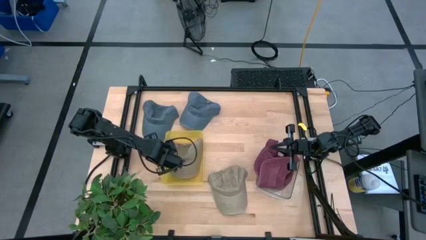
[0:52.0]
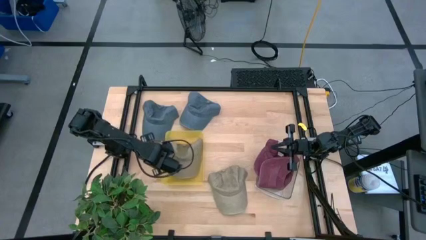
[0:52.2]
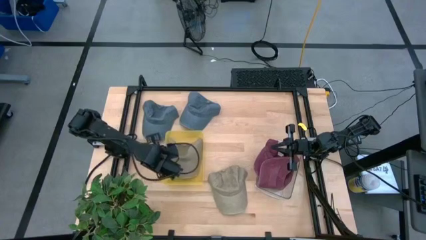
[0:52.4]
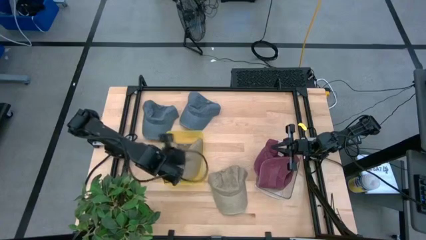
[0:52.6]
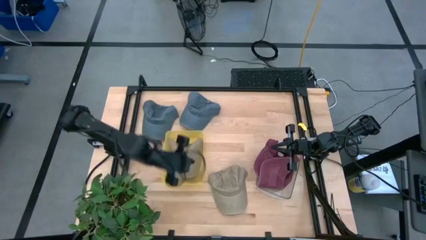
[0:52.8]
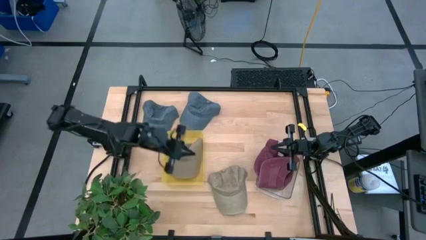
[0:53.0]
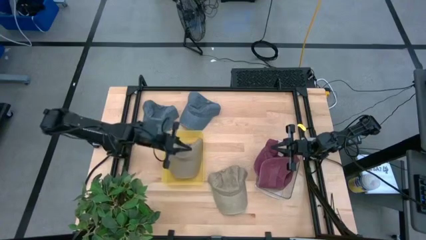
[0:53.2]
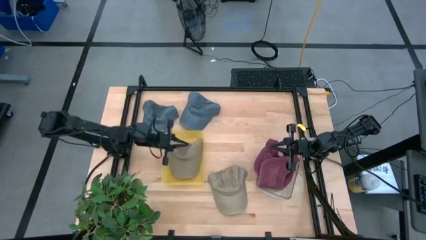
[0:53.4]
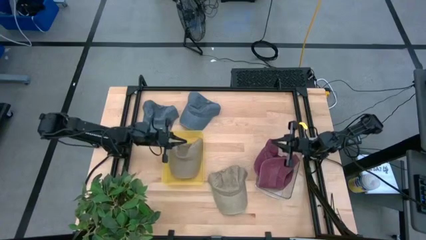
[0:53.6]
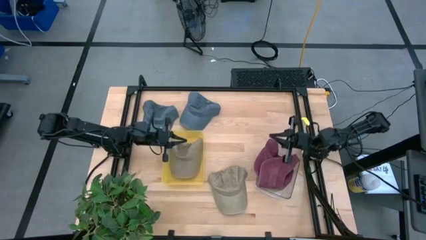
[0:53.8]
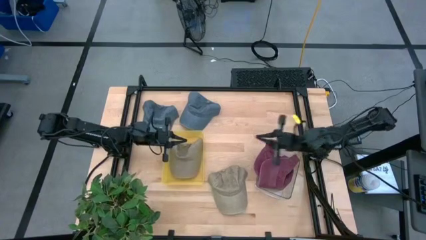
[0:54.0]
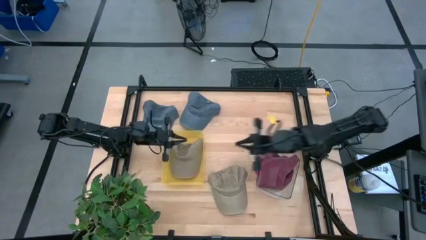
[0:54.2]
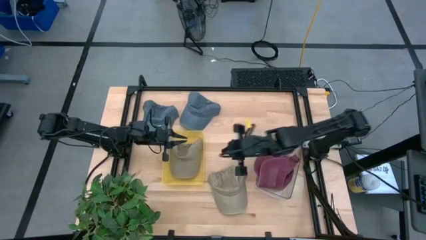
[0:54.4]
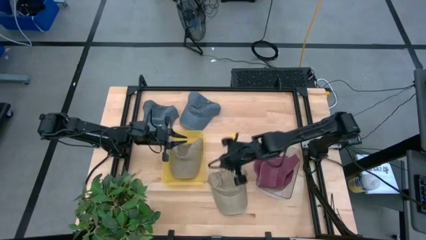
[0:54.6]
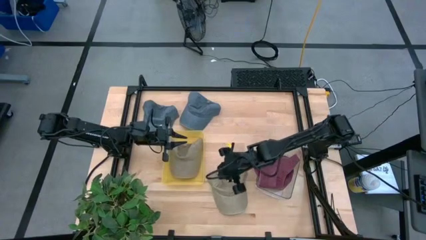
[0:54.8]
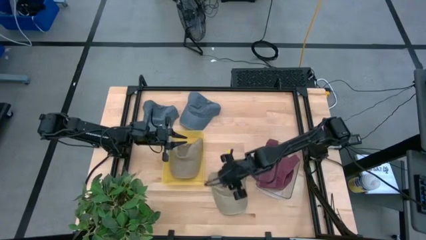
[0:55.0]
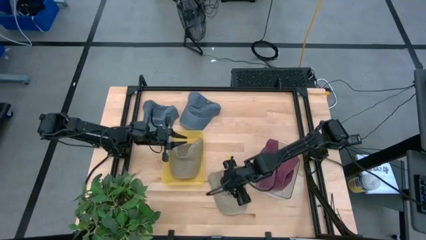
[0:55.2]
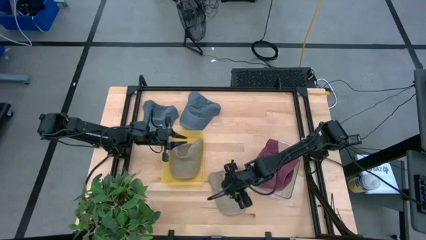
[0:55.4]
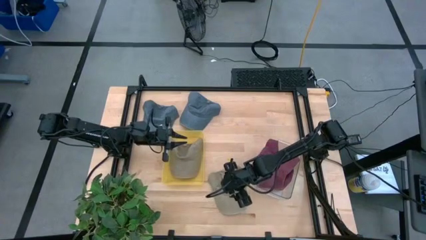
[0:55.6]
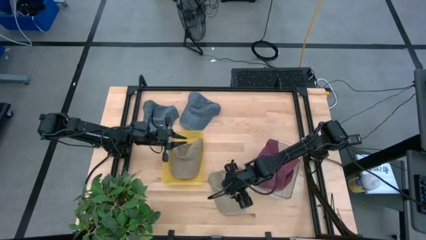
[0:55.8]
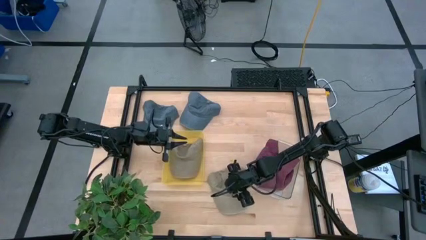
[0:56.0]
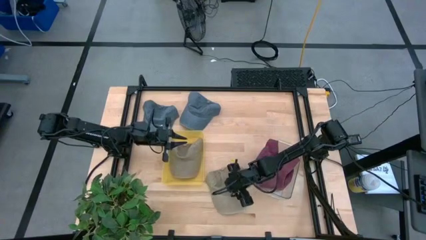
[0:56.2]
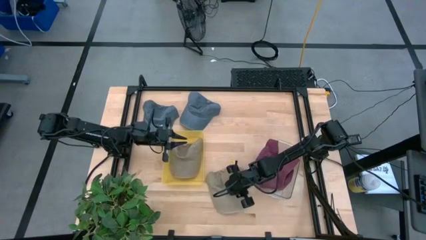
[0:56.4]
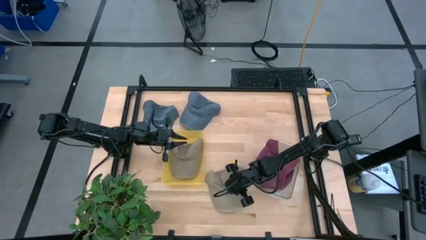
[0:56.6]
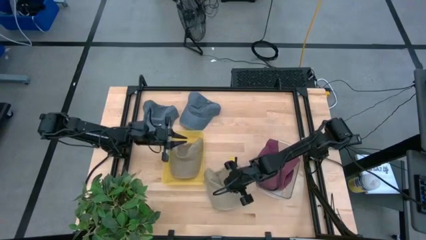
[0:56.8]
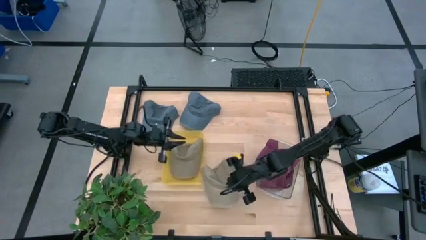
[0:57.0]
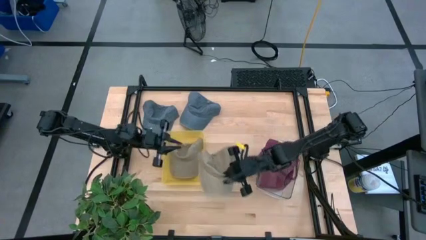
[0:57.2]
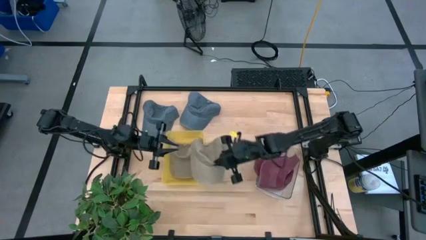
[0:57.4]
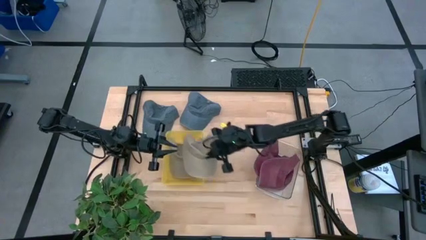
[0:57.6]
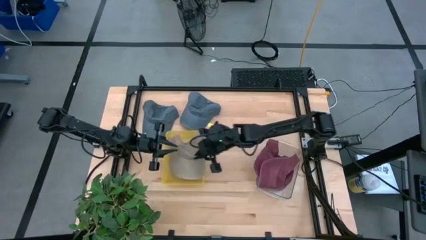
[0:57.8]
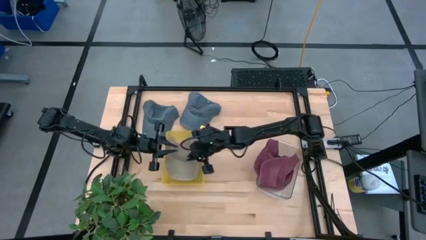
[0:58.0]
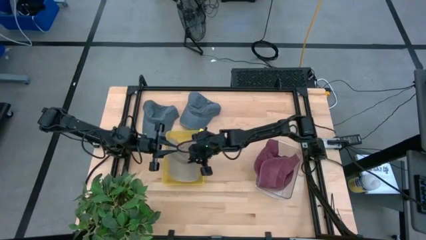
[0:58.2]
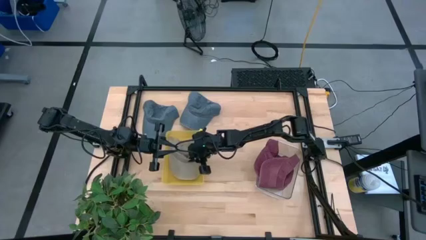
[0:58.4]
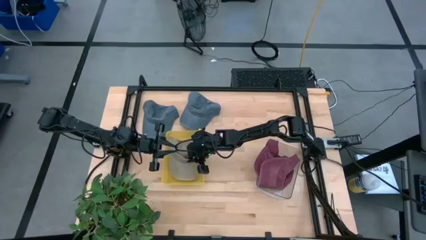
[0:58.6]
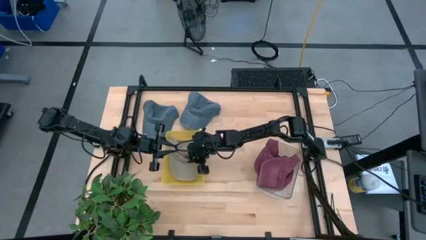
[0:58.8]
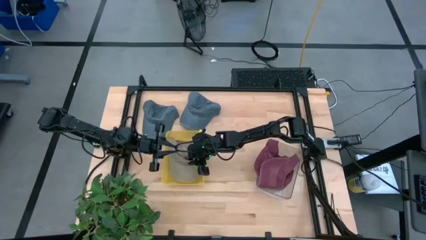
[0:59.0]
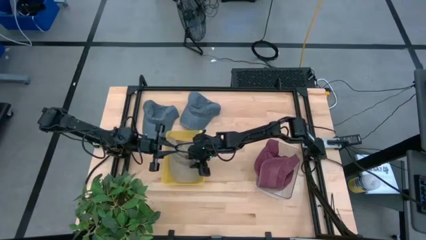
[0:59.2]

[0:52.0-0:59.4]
Task: Pick & Place hat
Put the brown cap into the yellow bin

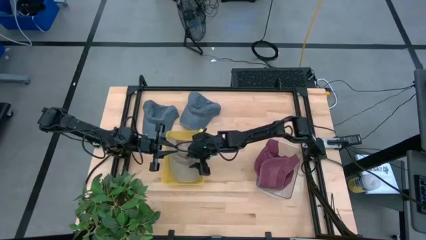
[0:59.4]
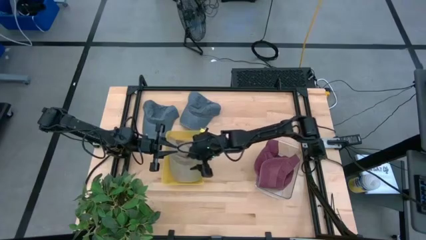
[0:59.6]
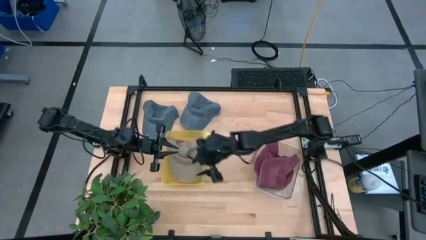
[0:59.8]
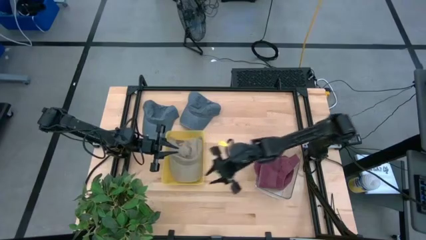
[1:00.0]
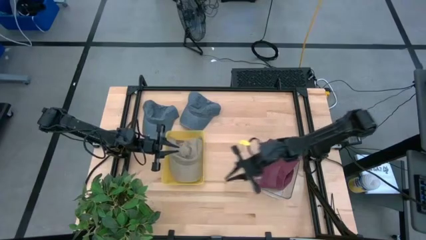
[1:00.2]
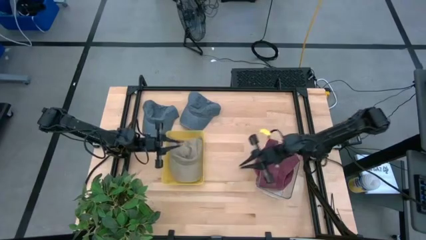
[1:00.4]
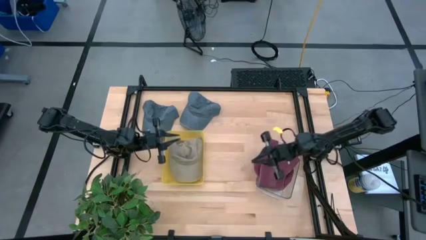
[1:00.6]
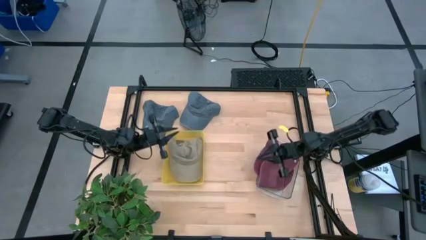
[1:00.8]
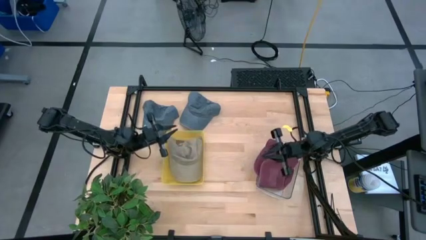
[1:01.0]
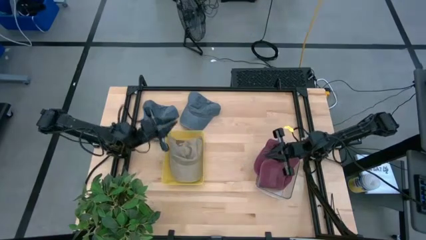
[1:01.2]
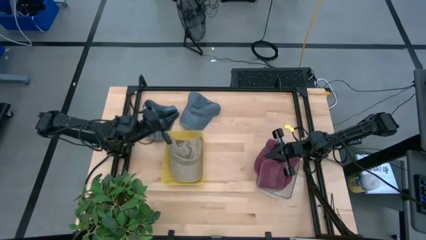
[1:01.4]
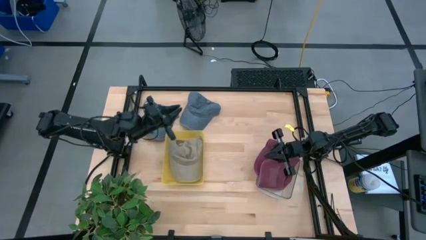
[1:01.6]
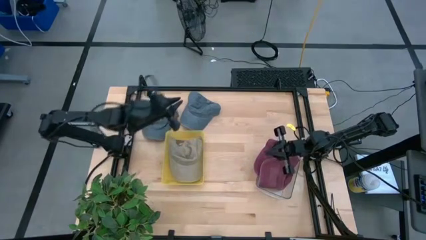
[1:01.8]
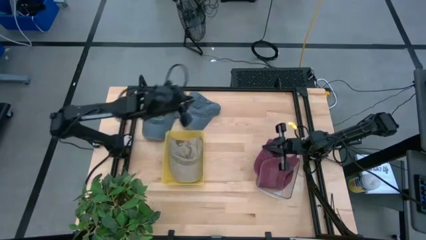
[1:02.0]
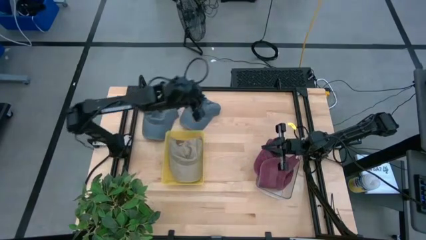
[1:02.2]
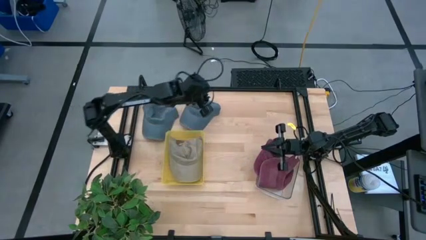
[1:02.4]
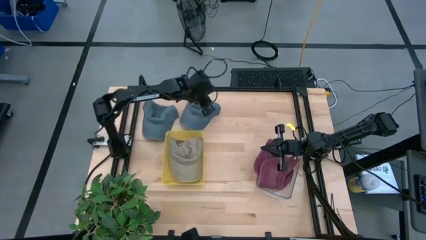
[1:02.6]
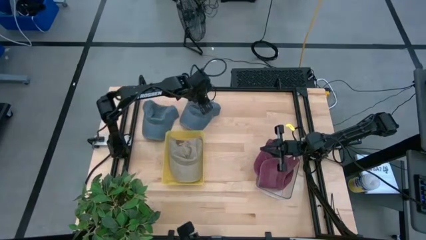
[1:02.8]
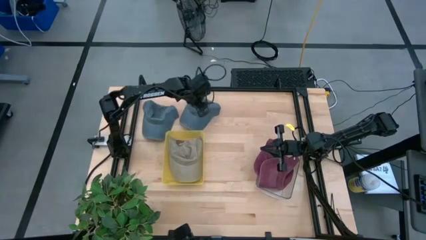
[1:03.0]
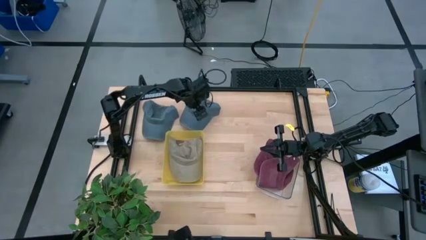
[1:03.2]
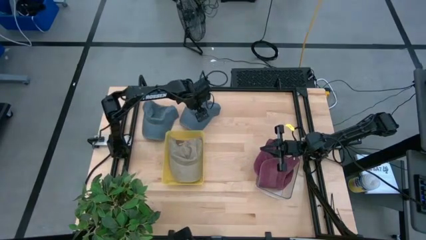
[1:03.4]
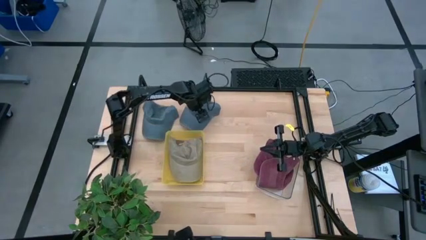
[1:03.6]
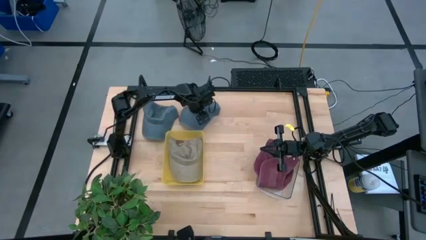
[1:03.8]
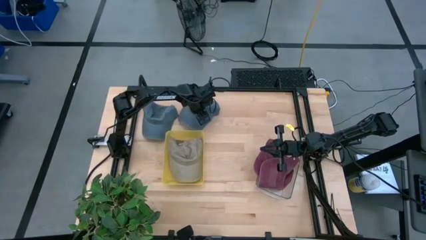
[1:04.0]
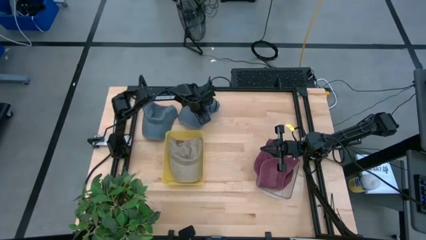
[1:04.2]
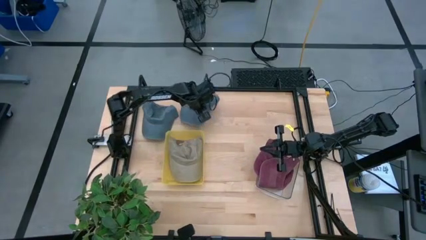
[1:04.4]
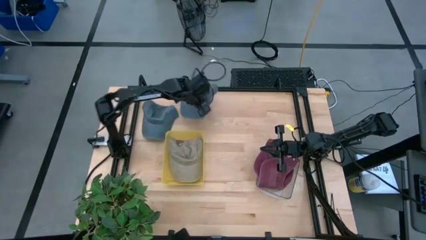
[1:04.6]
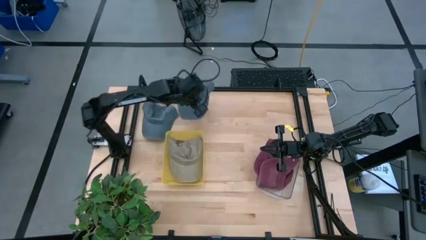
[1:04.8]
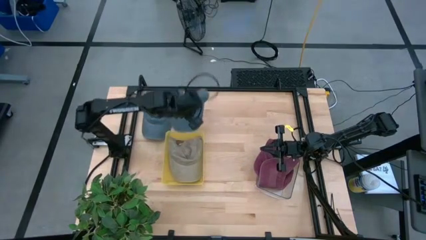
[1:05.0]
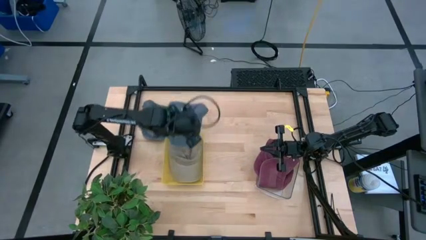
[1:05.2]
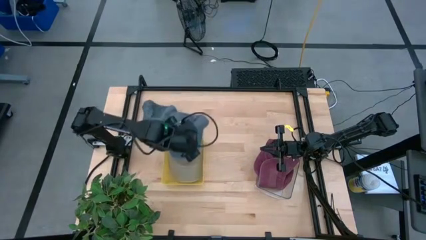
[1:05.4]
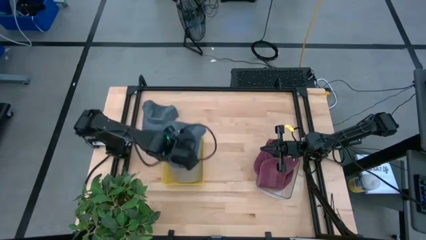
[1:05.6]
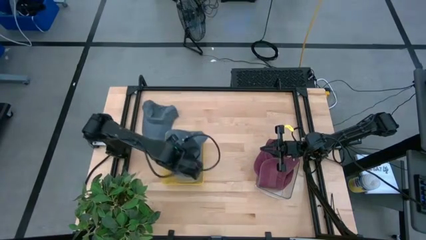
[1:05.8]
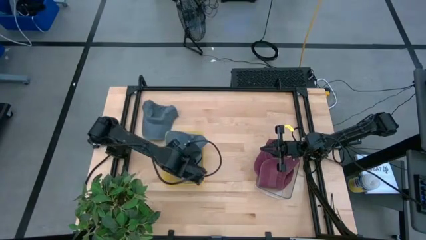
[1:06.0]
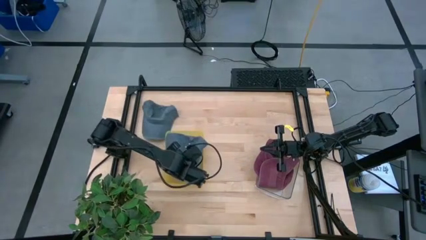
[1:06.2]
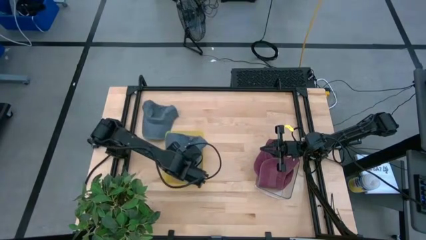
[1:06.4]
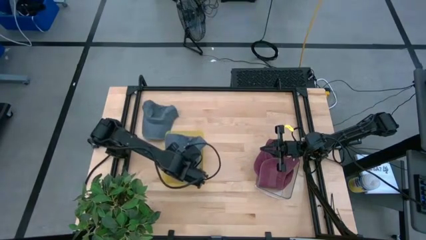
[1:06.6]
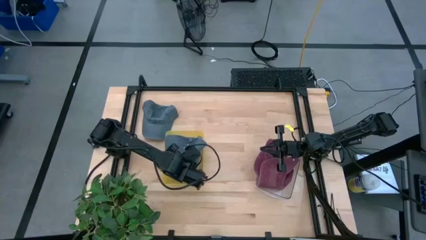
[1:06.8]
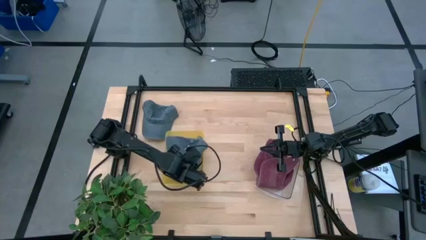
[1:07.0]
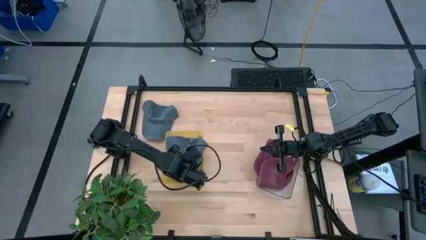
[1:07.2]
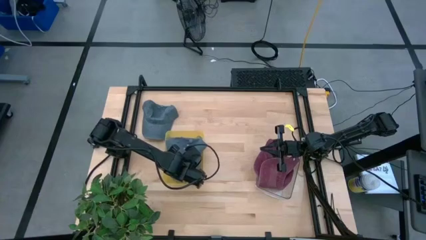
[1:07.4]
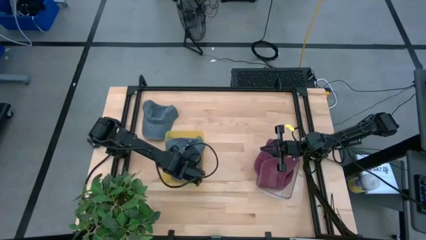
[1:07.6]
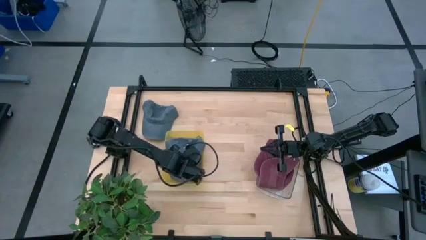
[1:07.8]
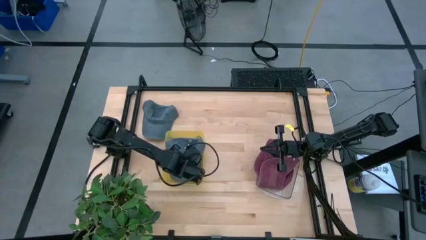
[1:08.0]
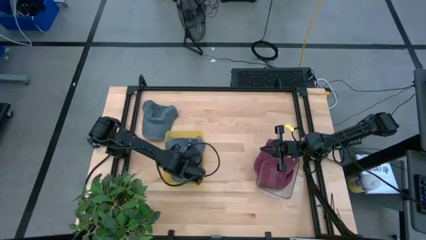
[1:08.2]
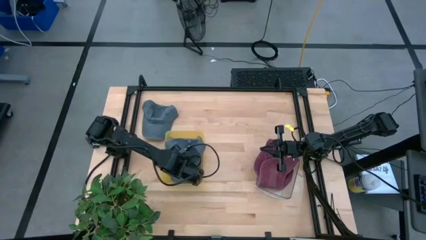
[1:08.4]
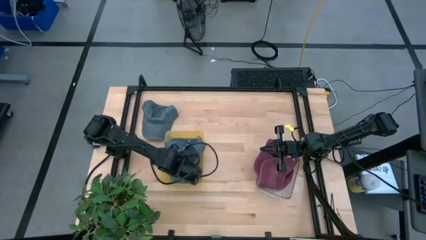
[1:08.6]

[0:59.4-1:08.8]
Put the right blue cap into the yellow bin
